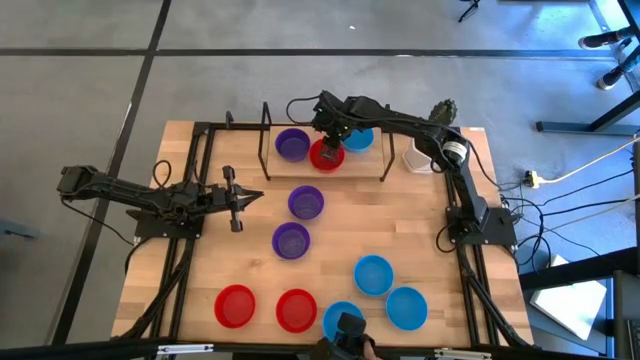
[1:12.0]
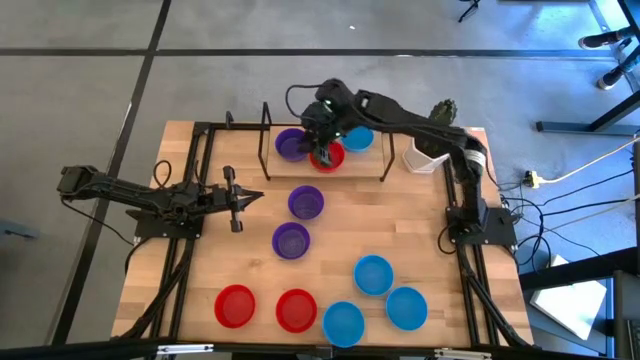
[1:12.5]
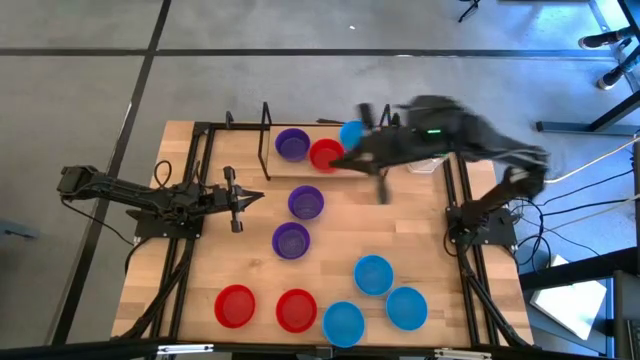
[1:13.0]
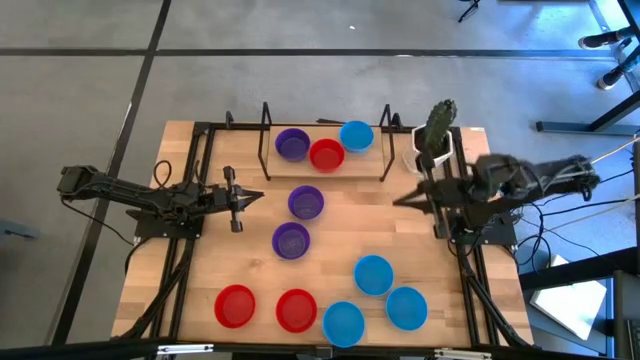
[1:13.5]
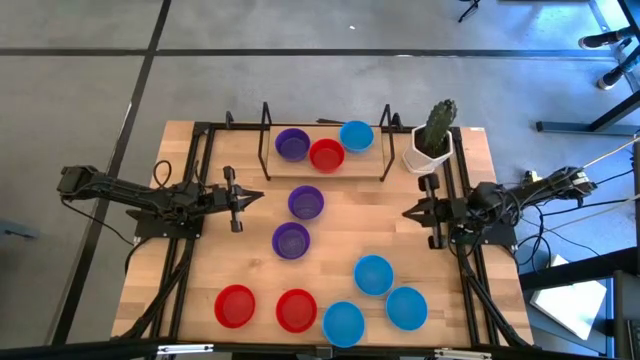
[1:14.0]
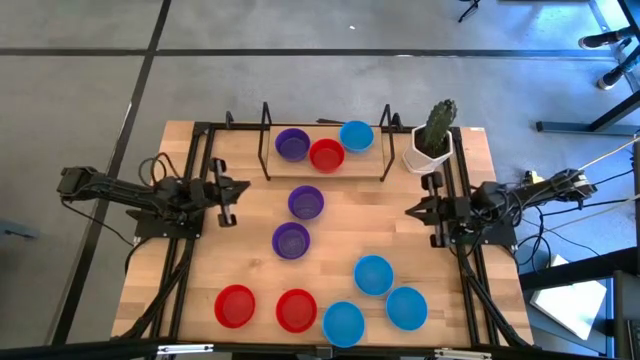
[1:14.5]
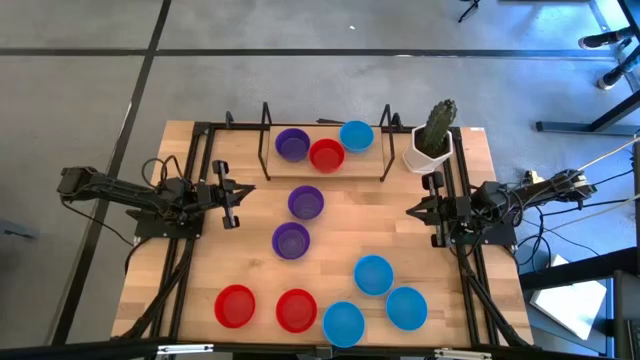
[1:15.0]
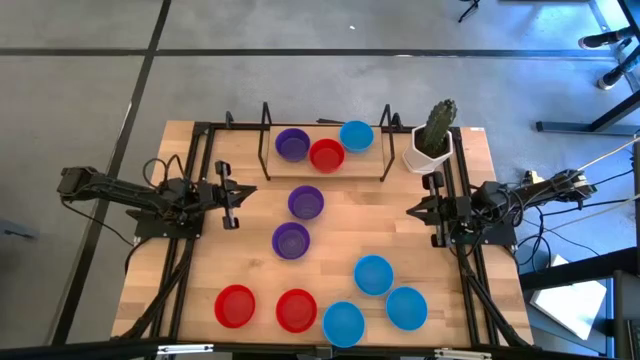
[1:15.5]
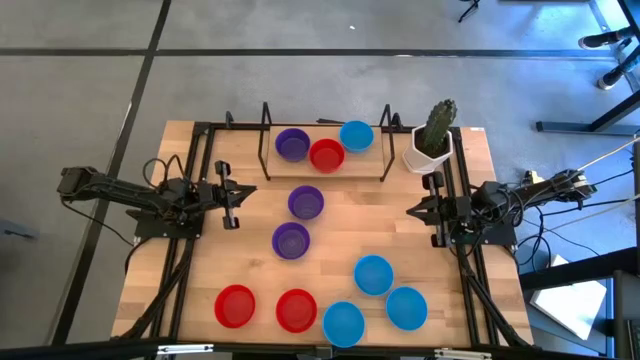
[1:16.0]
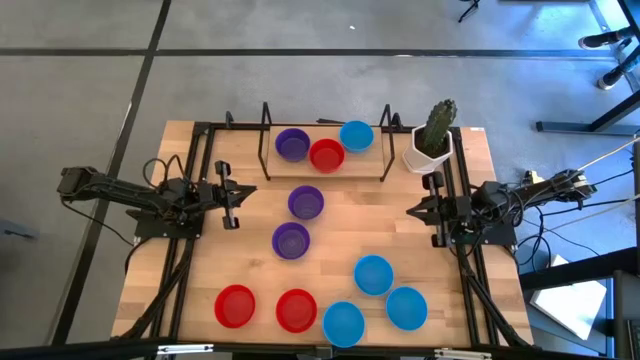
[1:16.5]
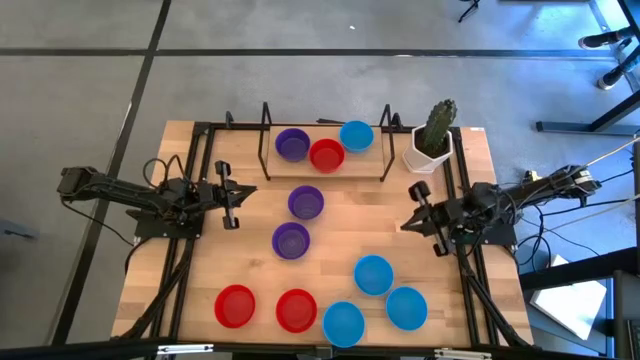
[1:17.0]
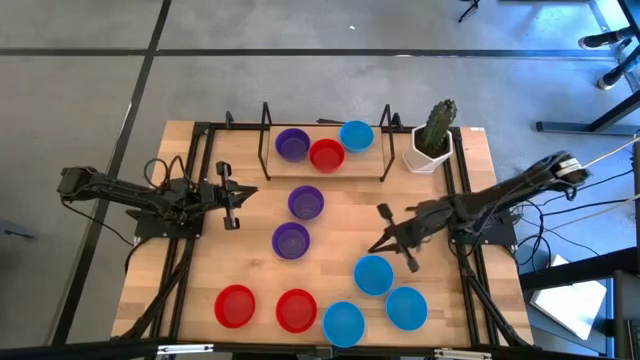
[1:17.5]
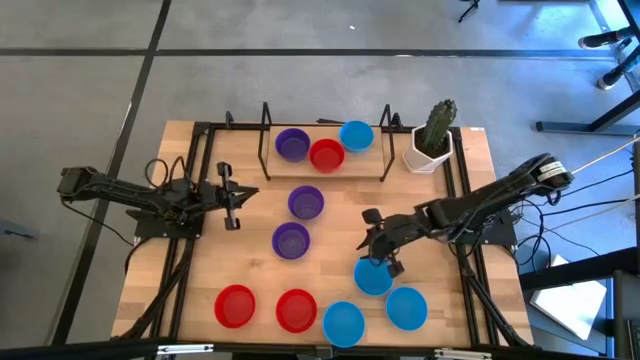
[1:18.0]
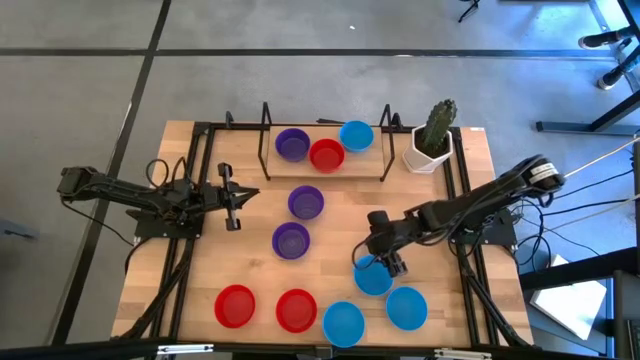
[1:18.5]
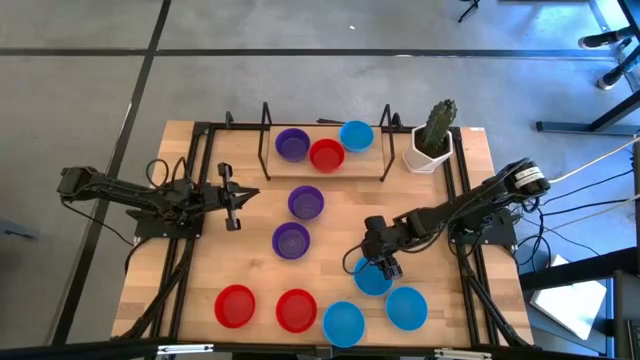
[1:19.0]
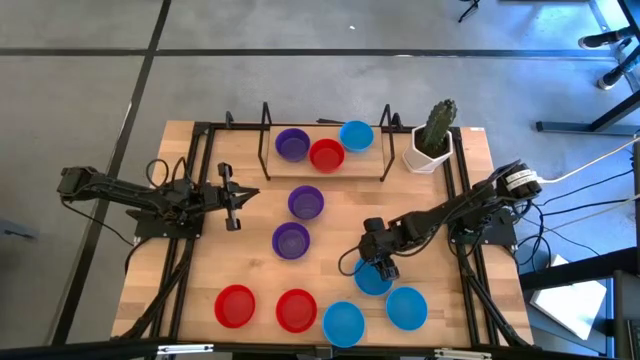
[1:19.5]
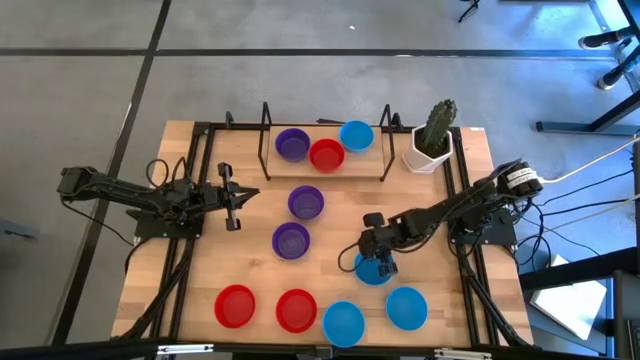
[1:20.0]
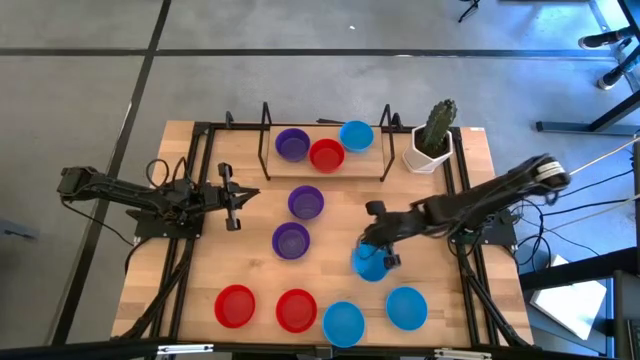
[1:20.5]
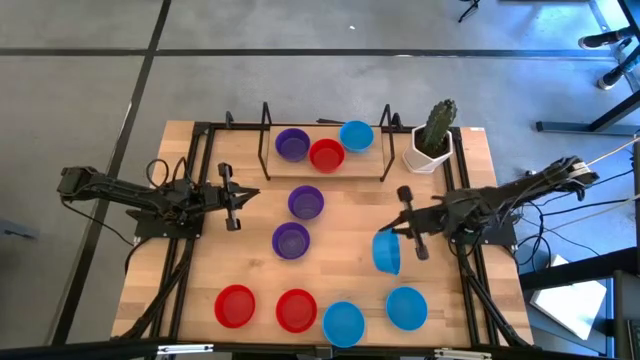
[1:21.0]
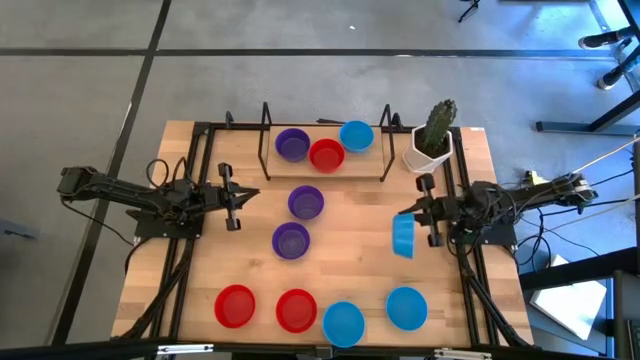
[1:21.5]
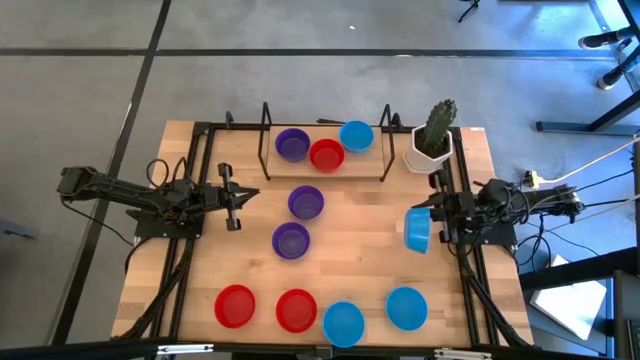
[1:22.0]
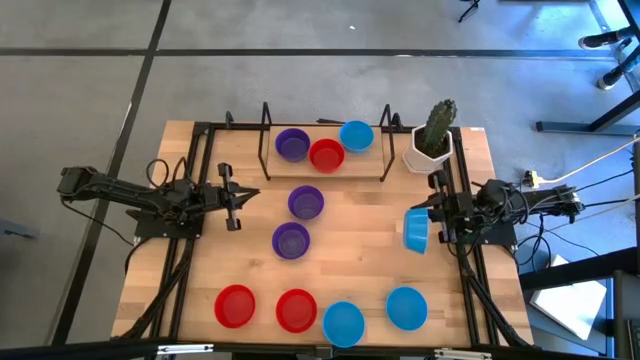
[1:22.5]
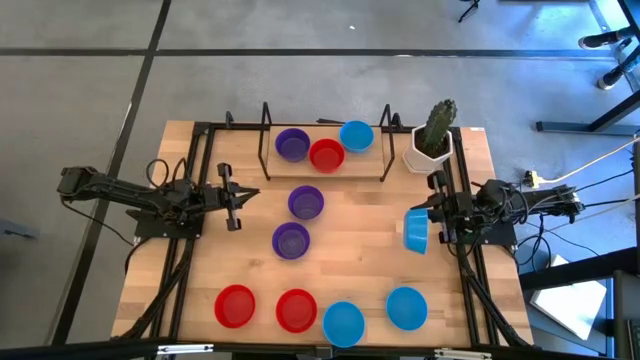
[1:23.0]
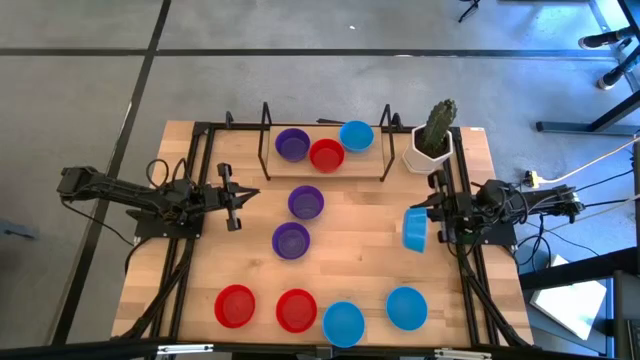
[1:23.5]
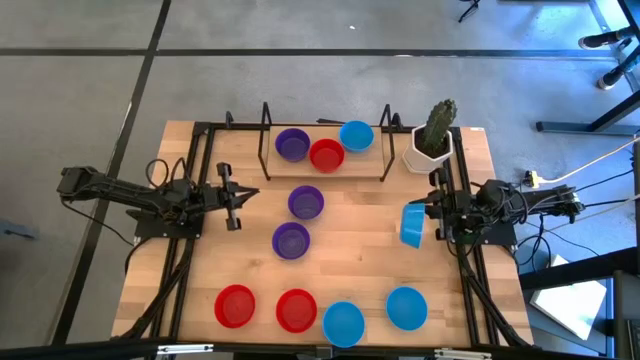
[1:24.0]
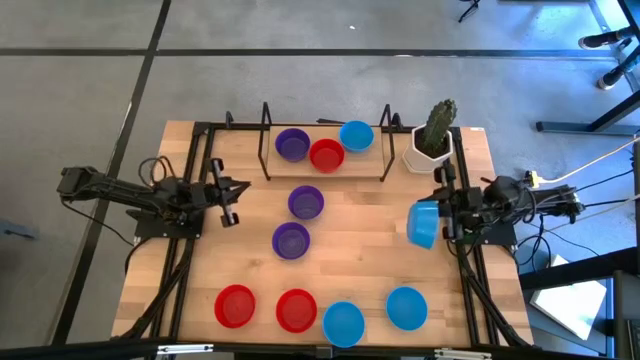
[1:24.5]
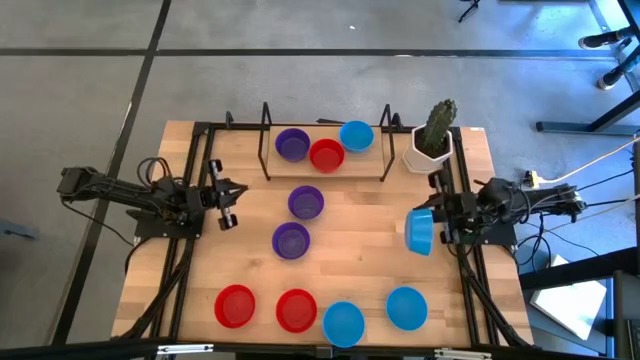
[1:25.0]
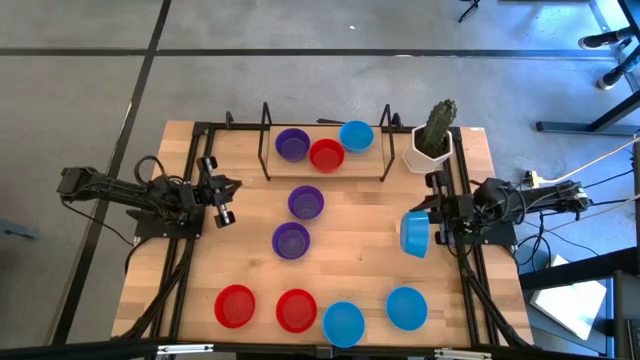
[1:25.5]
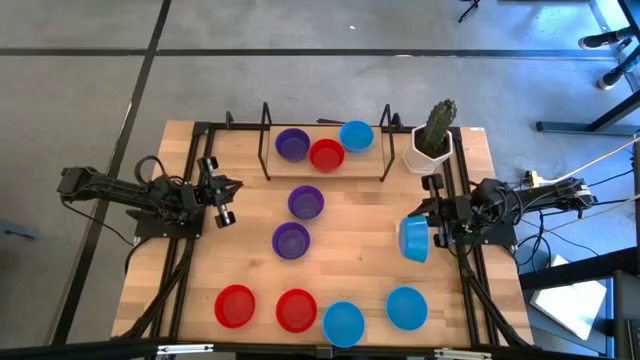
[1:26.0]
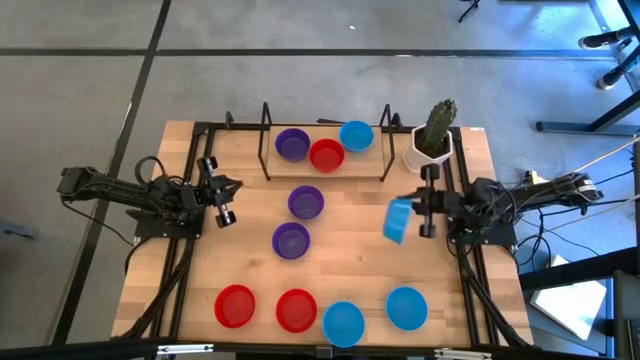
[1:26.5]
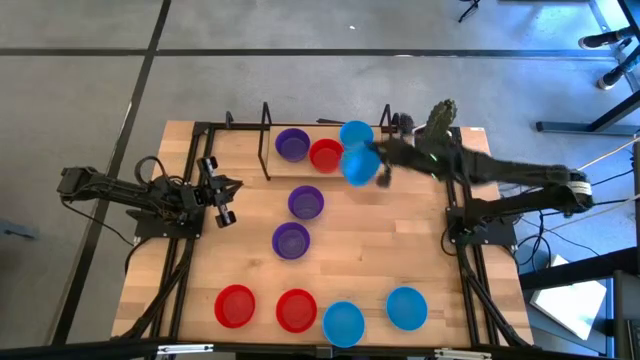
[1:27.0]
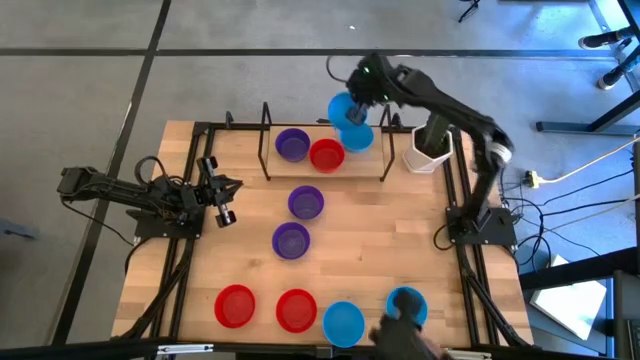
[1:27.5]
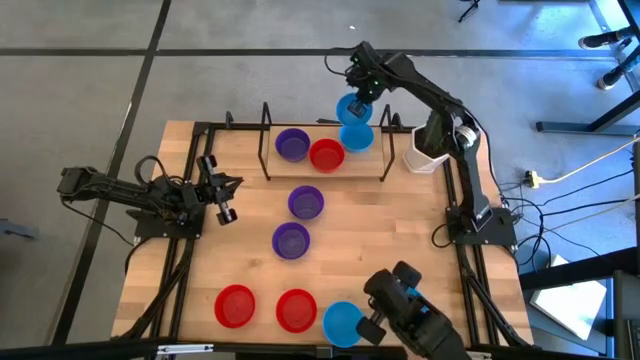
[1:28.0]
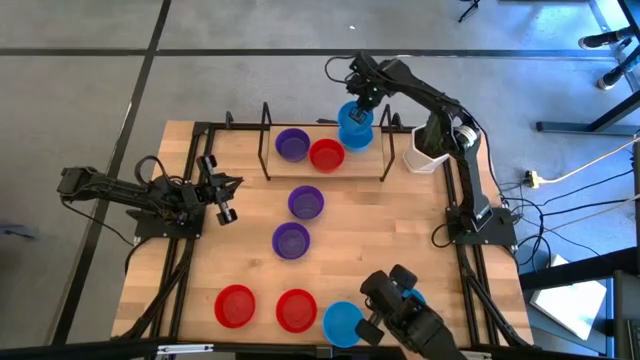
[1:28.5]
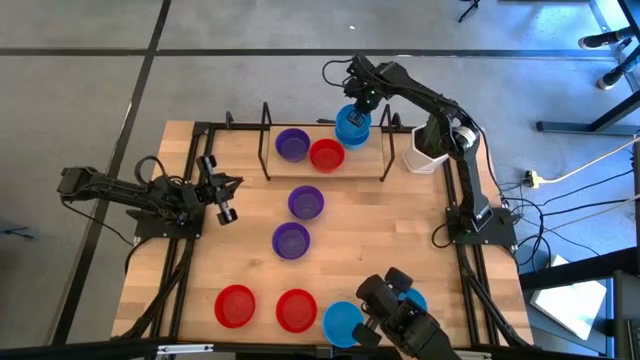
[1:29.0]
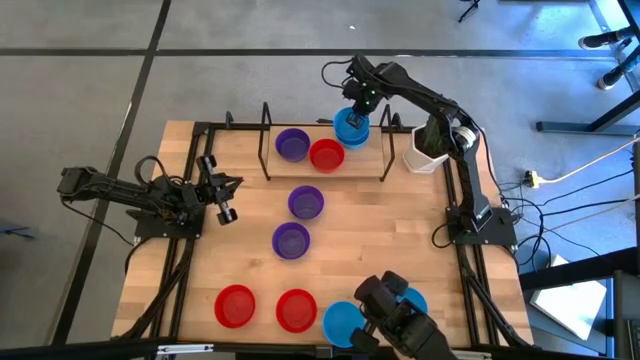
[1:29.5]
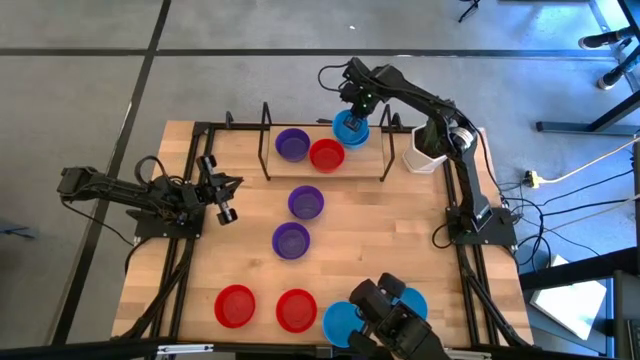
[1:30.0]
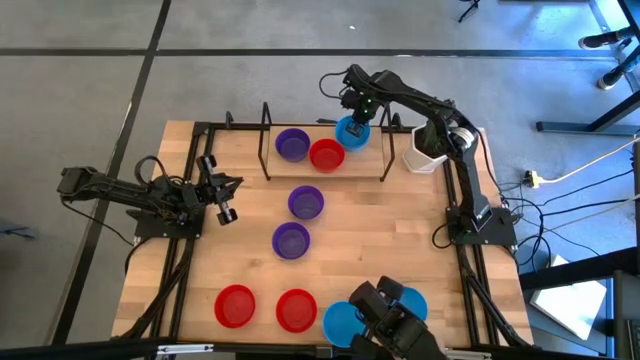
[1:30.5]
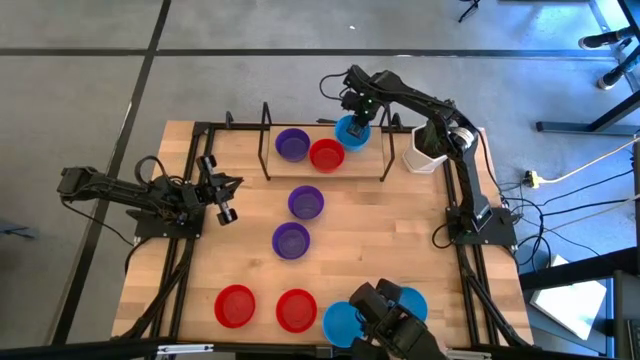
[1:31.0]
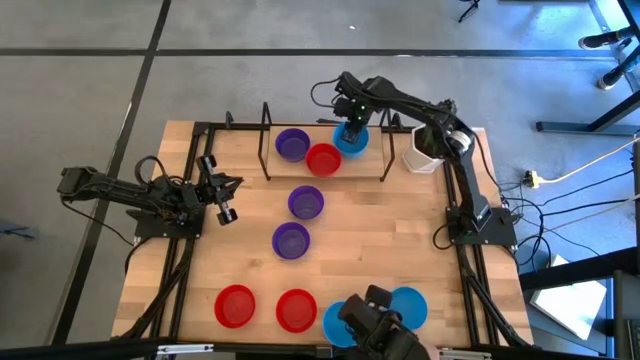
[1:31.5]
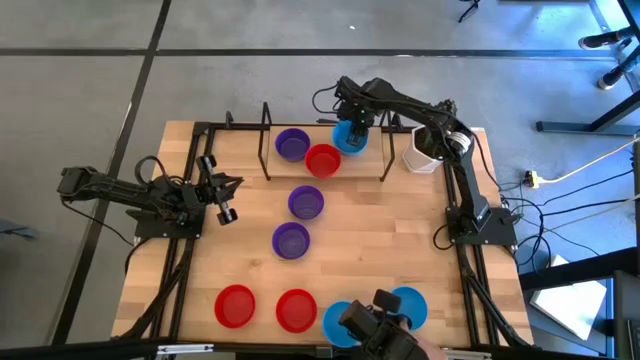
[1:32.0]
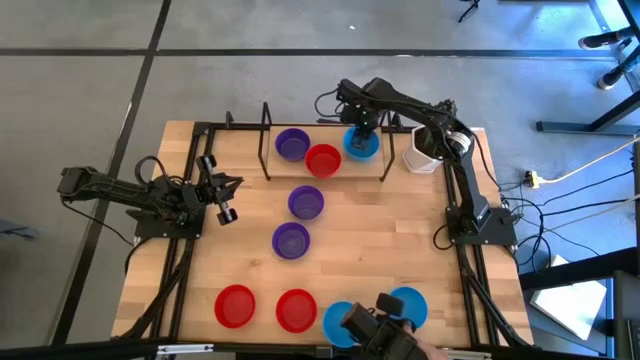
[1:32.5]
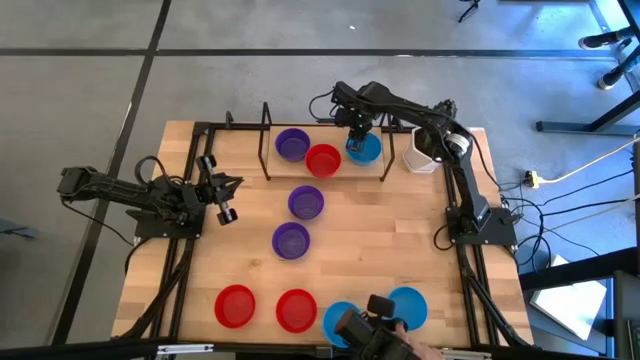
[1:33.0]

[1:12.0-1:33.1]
Task: Pick & Place Mini bowls
Stack the blue bowl on top of the blue bowl on the shelf

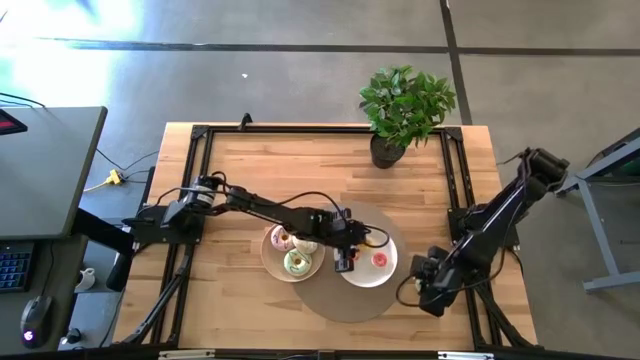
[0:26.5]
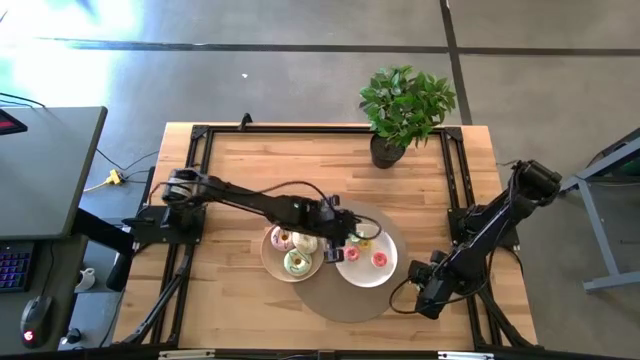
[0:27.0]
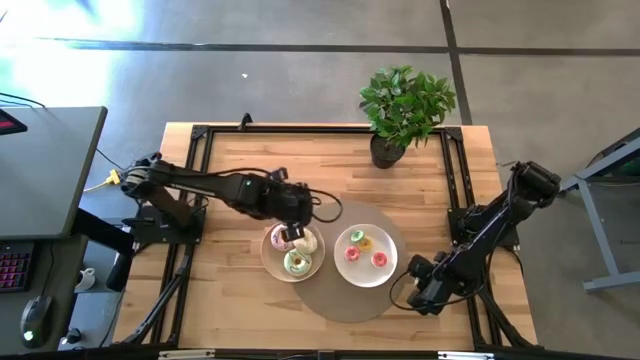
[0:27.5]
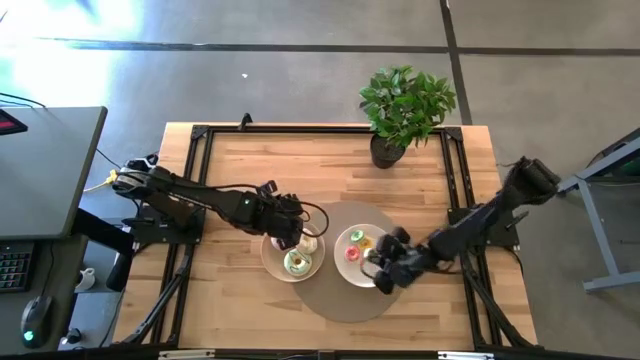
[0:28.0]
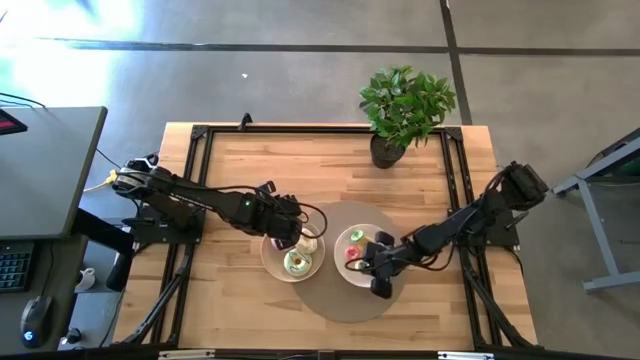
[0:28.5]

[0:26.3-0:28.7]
Task: Pick & Place donuts
Put the small green donut on the white plate
